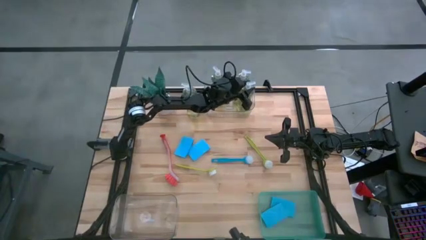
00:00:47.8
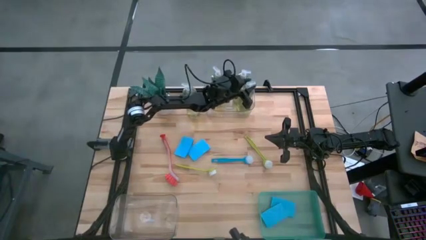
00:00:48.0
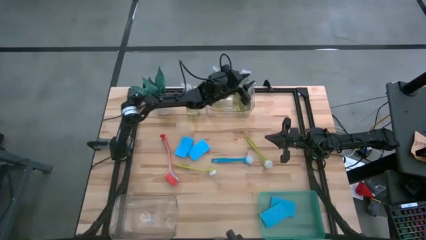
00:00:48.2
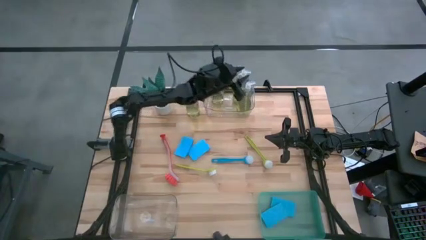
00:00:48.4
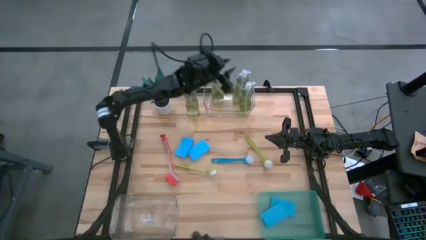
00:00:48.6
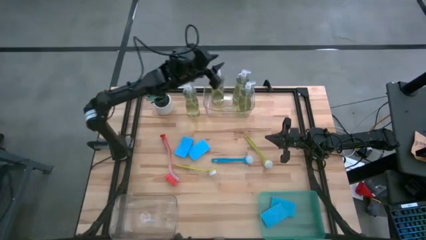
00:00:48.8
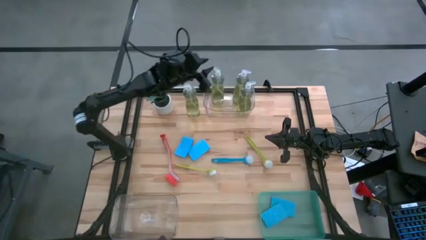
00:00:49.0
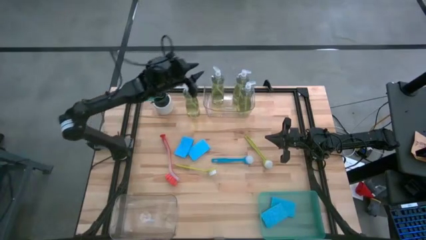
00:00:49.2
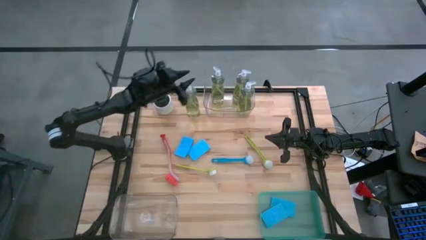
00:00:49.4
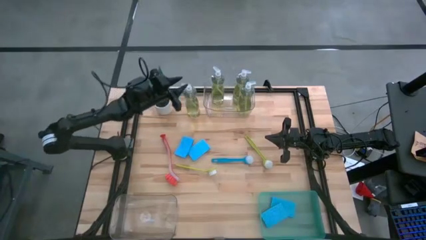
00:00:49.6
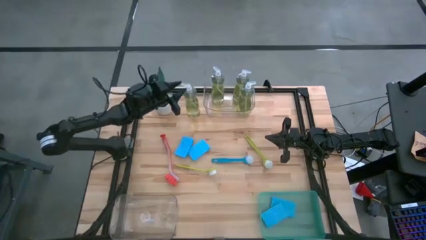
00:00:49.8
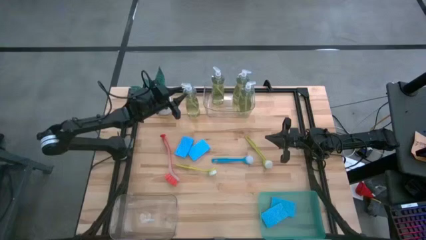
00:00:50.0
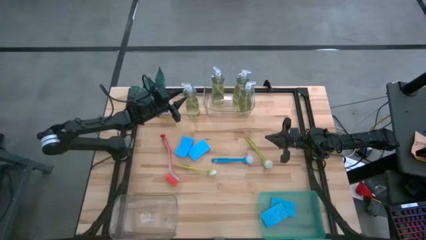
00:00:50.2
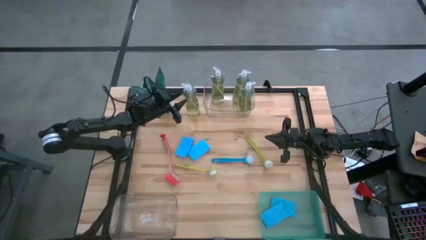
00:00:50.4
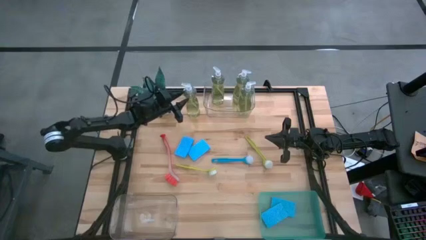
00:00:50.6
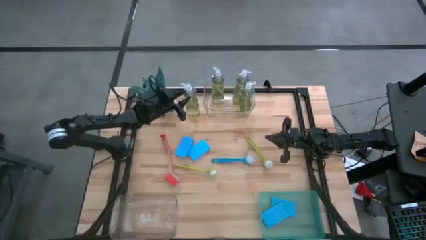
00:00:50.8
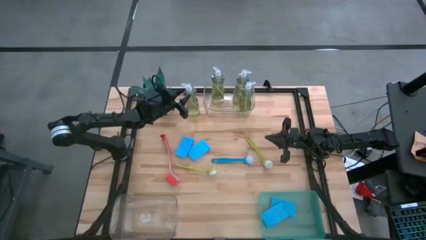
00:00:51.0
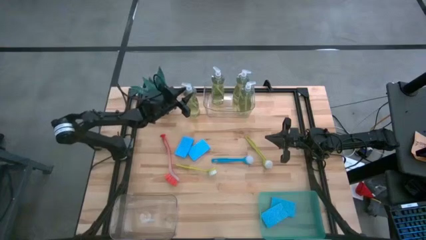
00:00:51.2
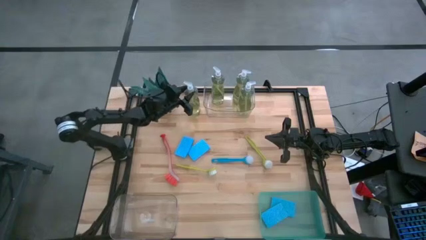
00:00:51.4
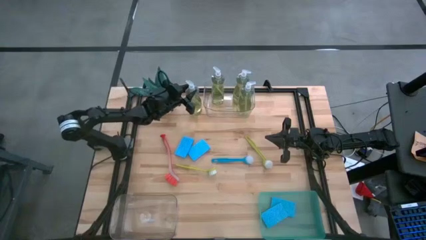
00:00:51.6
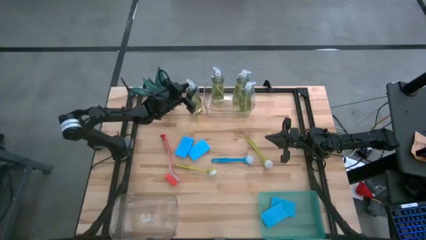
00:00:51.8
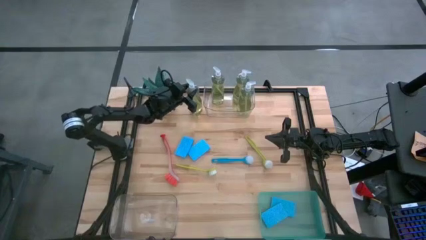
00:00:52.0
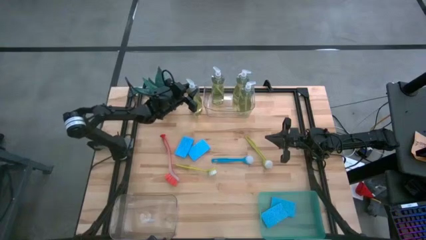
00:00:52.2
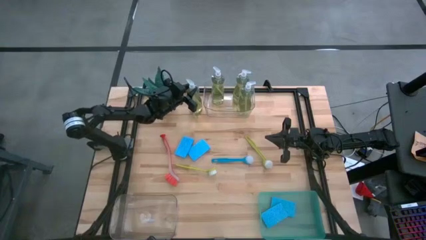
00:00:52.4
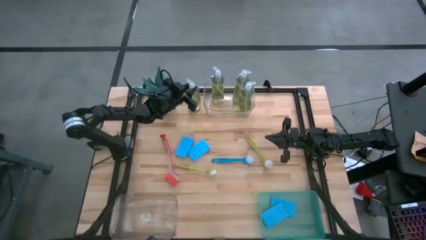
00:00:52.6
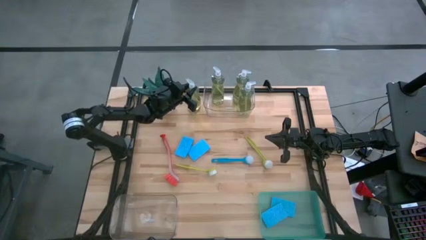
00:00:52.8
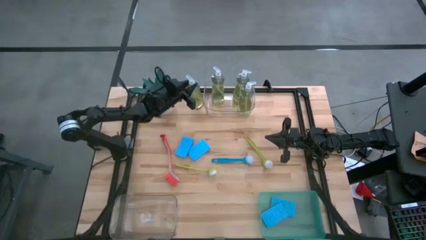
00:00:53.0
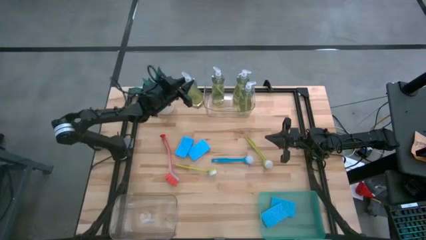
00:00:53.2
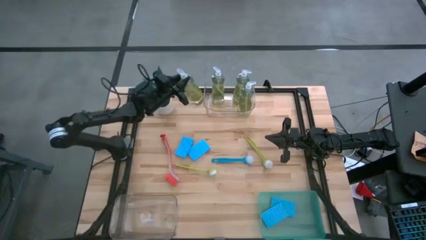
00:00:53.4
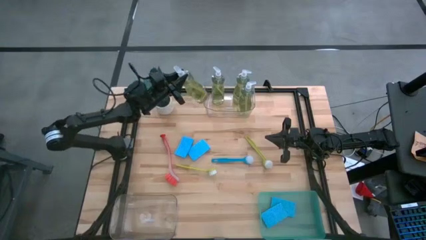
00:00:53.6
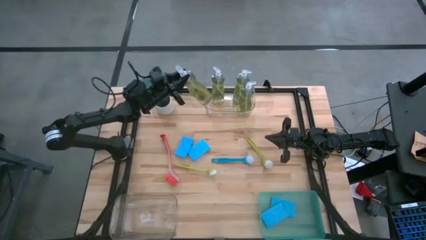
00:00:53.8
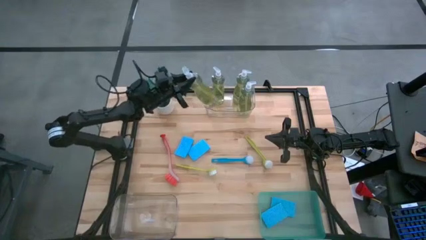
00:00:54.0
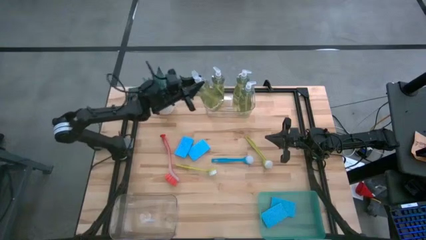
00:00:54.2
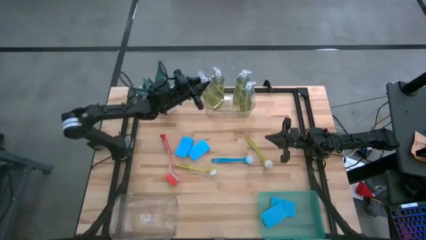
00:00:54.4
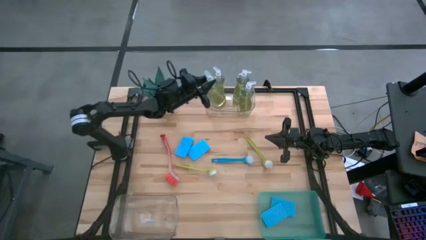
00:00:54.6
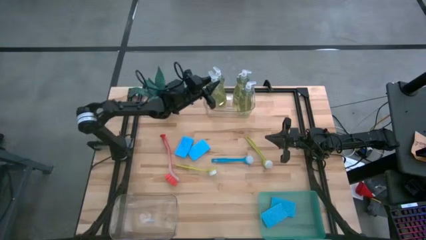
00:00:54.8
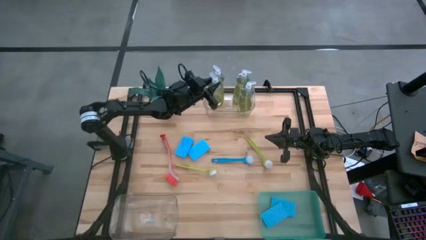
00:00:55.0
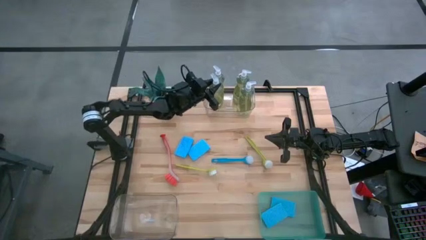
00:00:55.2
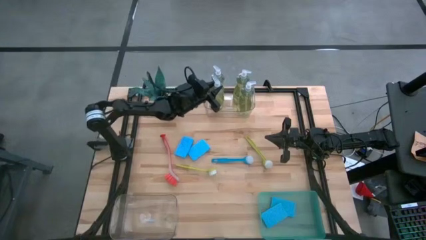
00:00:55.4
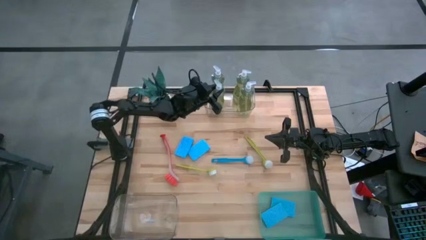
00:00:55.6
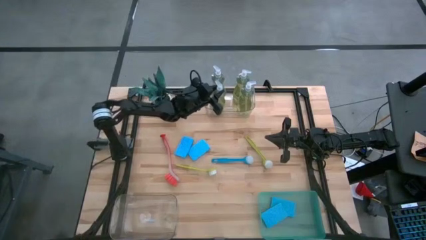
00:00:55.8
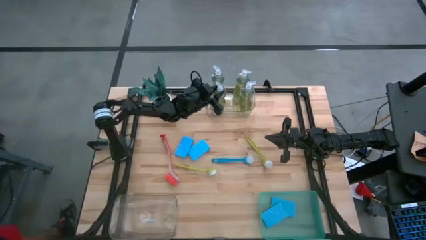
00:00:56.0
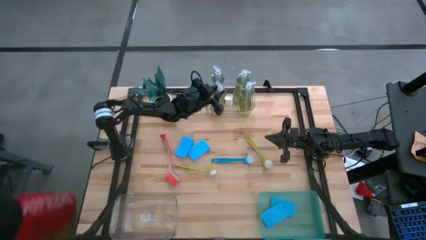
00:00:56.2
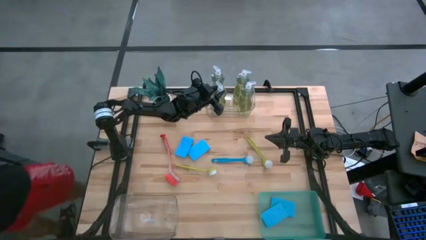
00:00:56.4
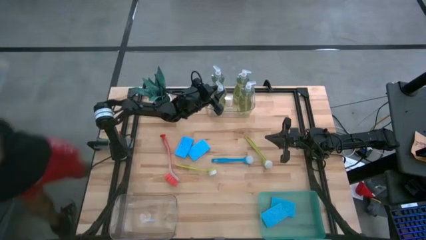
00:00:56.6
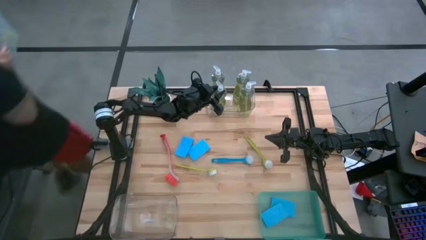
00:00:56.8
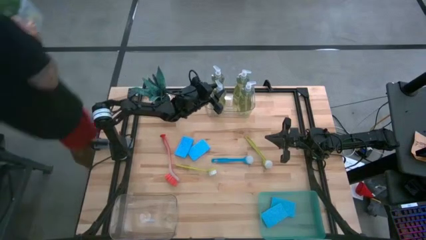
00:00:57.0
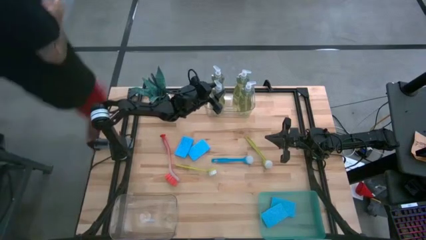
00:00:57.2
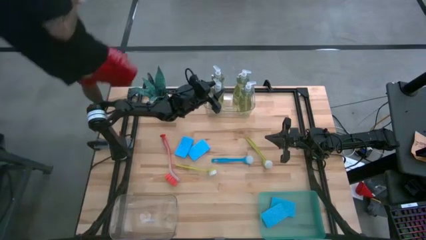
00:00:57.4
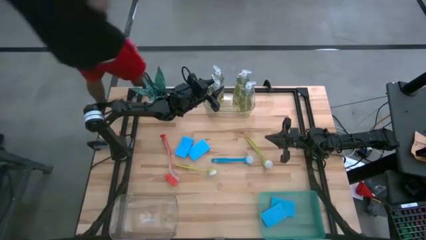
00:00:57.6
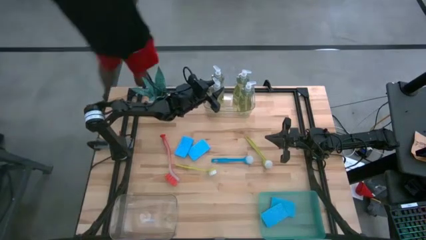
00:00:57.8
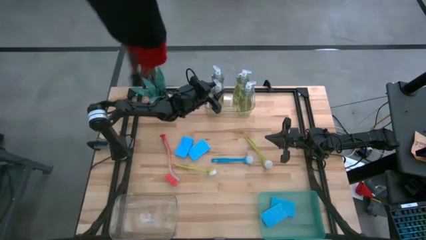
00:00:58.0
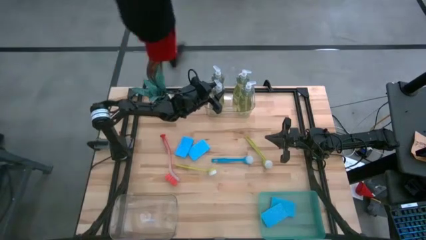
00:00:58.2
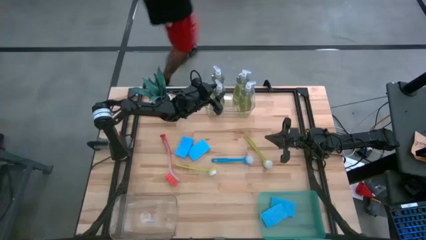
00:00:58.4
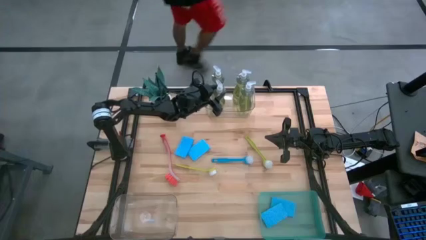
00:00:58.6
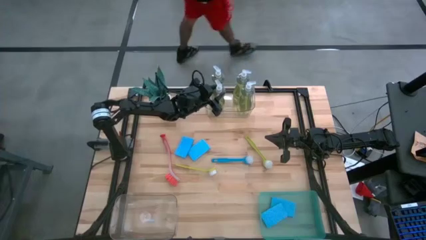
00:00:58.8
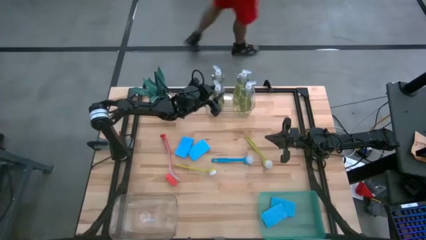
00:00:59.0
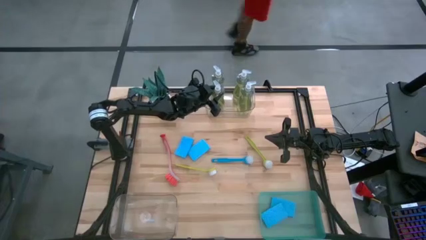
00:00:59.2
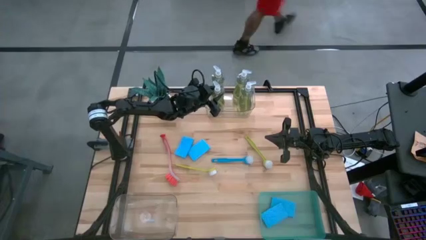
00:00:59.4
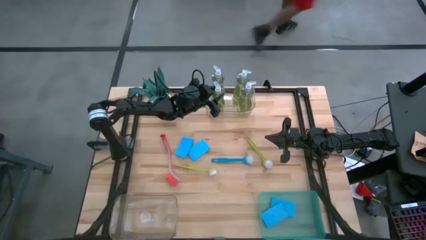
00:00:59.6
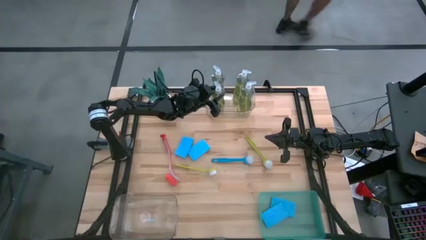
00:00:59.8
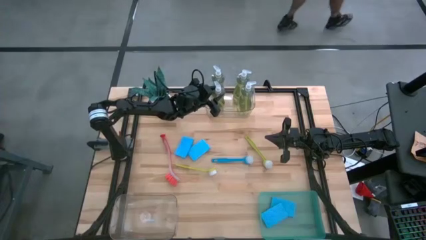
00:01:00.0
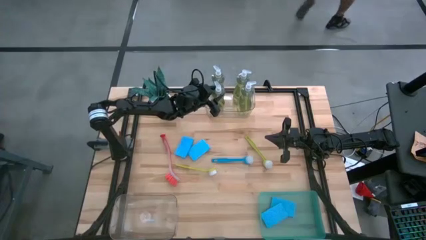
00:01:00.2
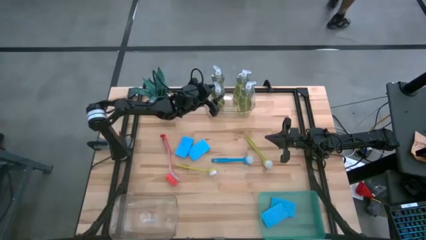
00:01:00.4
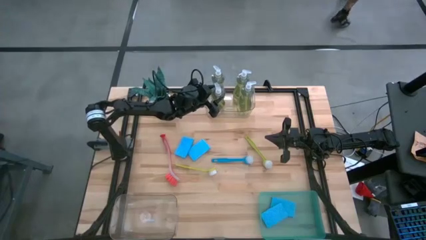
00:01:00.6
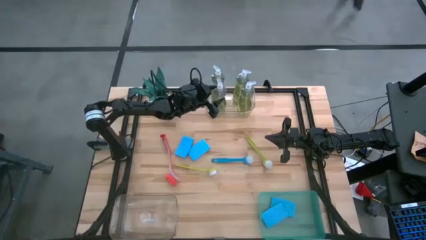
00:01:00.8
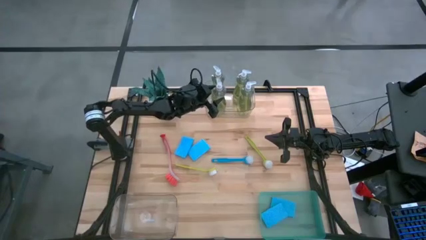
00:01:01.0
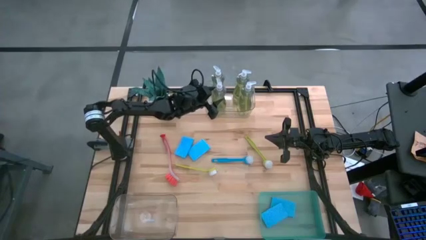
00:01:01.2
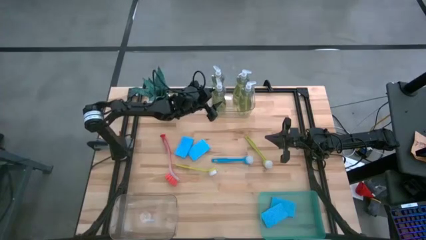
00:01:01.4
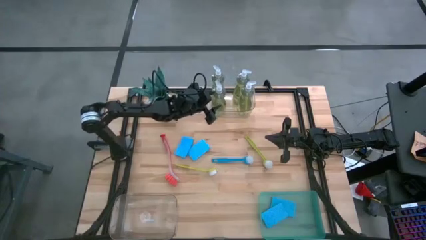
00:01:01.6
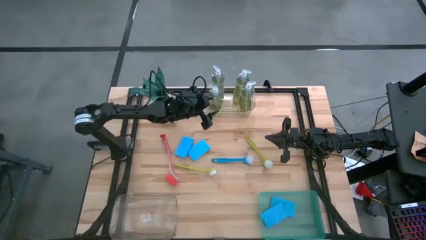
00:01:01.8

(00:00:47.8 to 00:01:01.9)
Task: Pick & Place Kitchen Sink Supplies
Put the liquid detergent into the top transparent bin

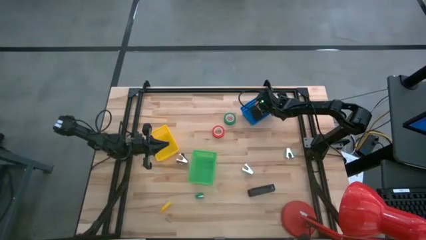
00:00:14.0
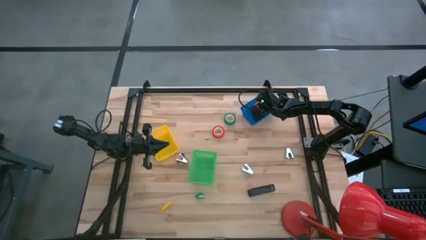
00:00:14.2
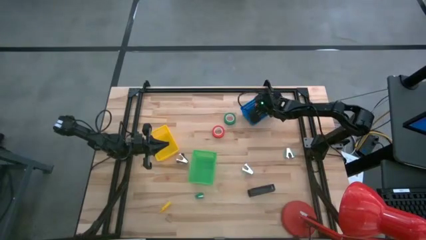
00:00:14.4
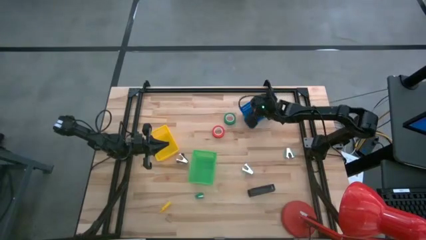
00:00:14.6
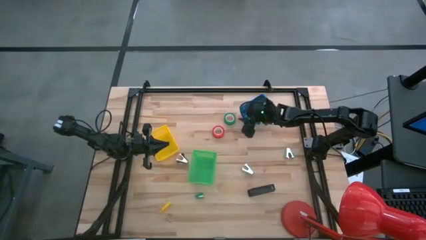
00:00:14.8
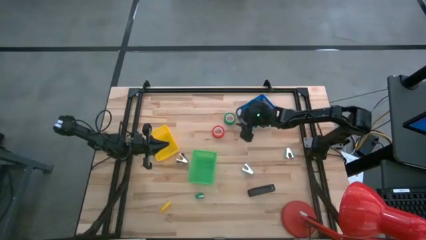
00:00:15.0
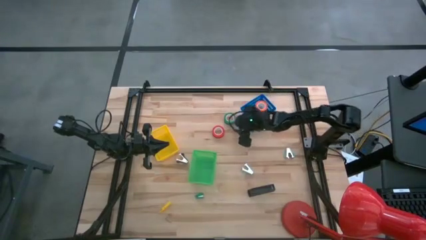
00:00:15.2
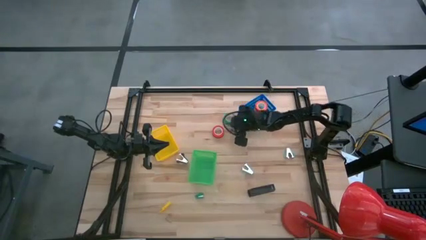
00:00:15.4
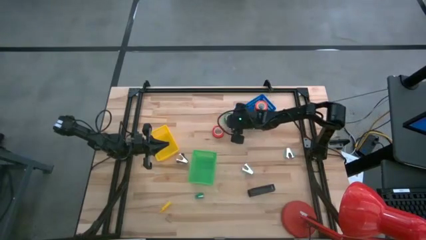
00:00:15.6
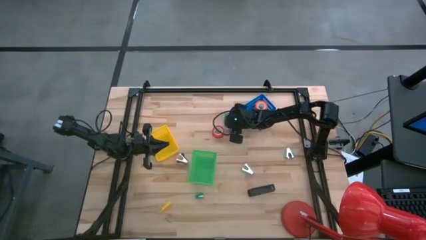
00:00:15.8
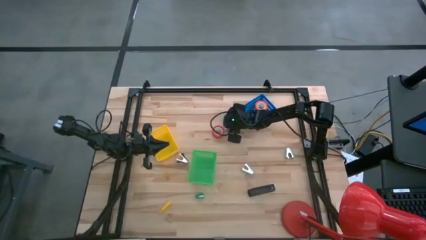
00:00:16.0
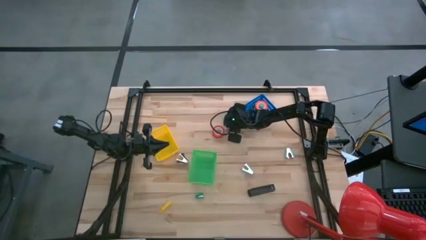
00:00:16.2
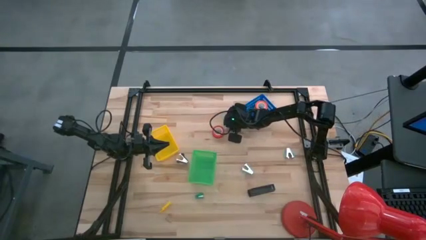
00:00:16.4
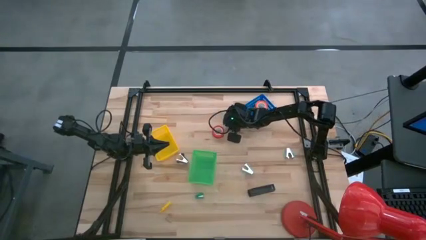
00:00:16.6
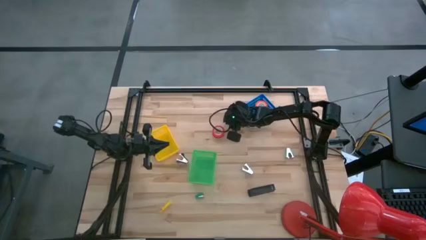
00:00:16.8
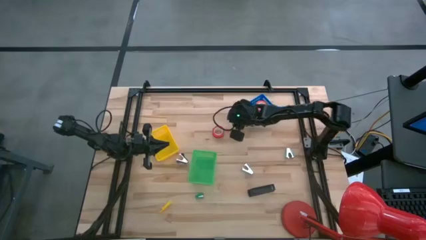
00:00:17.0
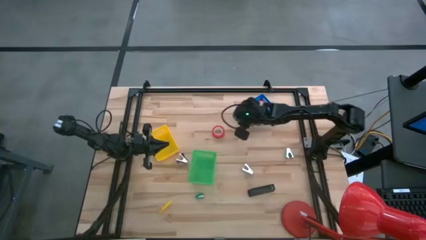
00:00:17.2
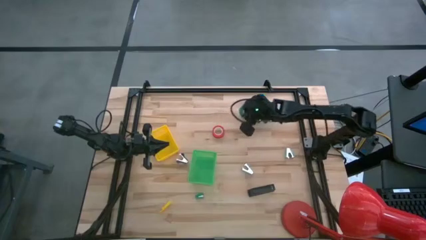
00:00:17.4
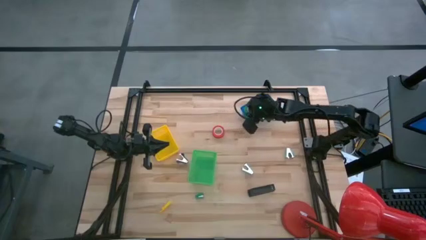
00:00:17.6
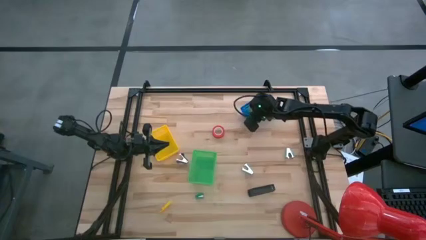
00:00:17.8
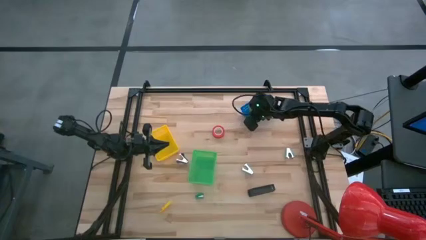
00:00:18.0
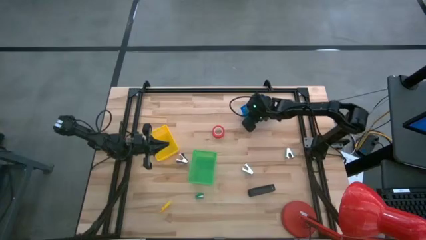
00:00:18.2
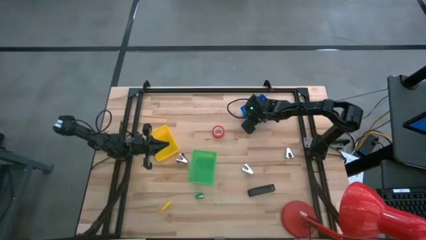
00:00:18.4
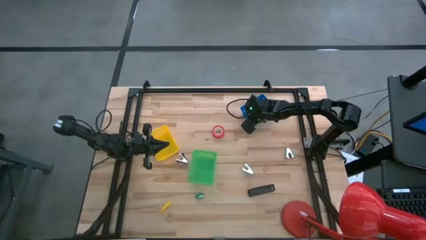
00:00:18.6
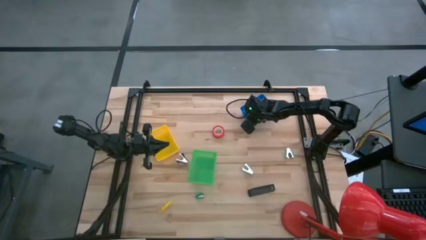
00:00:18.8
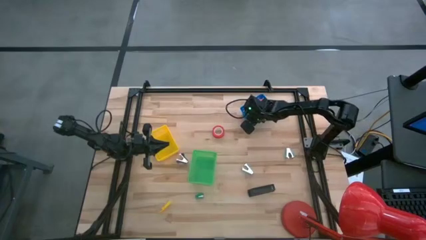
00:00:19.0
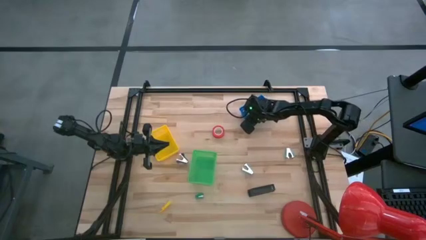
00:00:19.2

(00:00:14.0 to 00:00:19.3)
Task: Pick and place Stapler, Stapler remover, tape
Put the green tape into the blue bin
